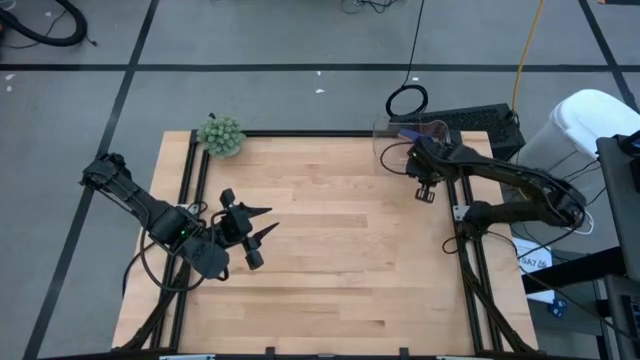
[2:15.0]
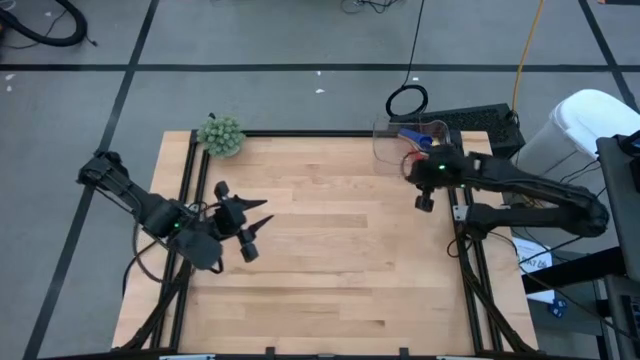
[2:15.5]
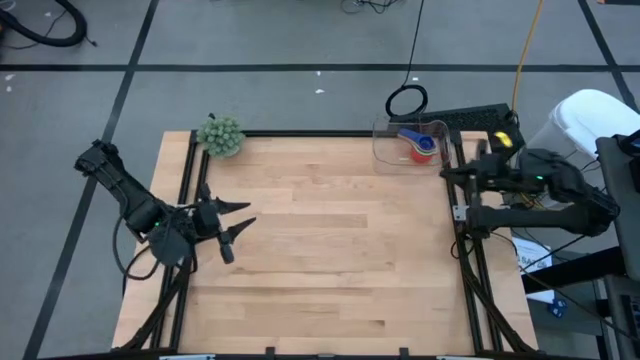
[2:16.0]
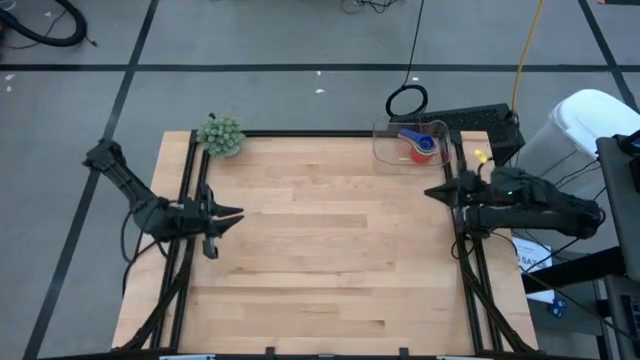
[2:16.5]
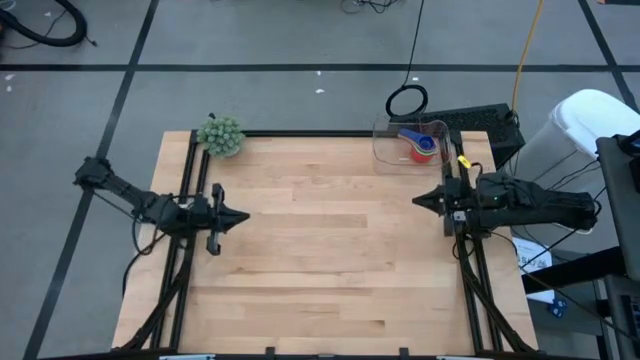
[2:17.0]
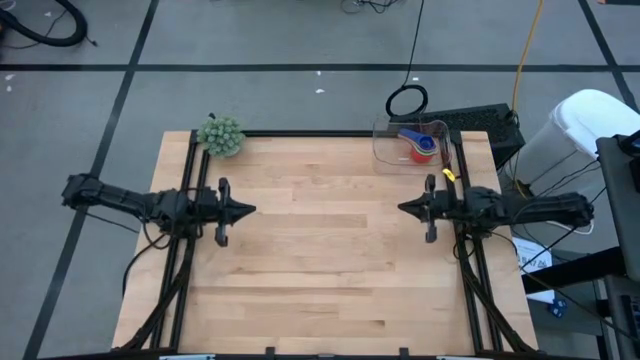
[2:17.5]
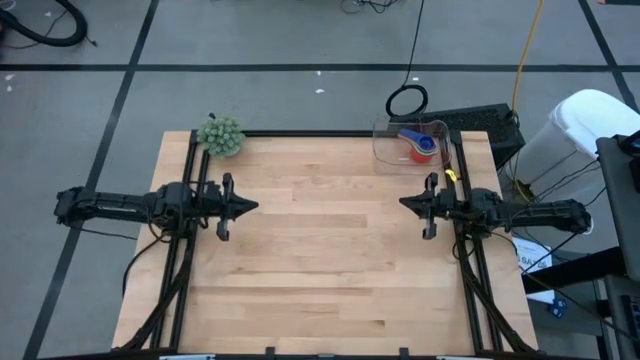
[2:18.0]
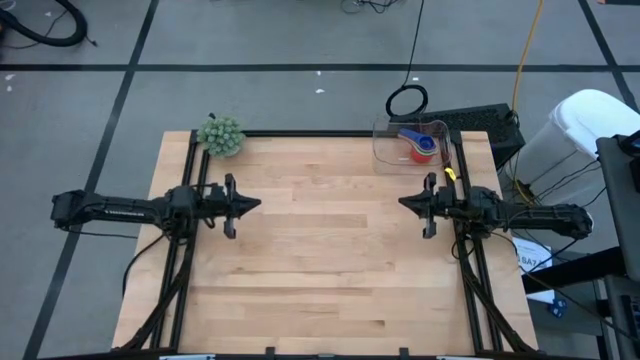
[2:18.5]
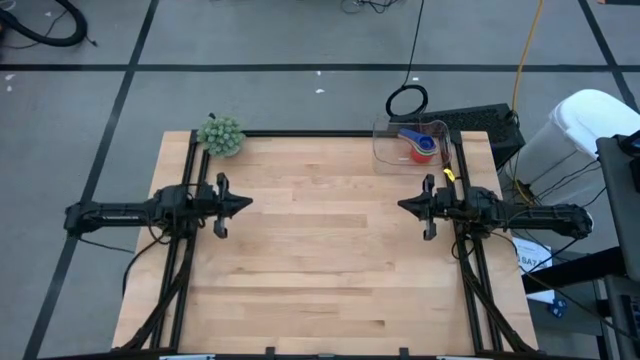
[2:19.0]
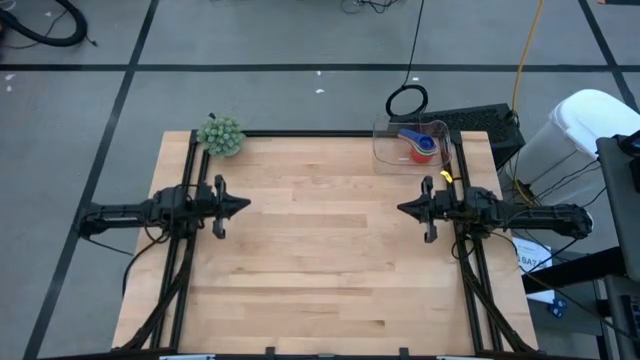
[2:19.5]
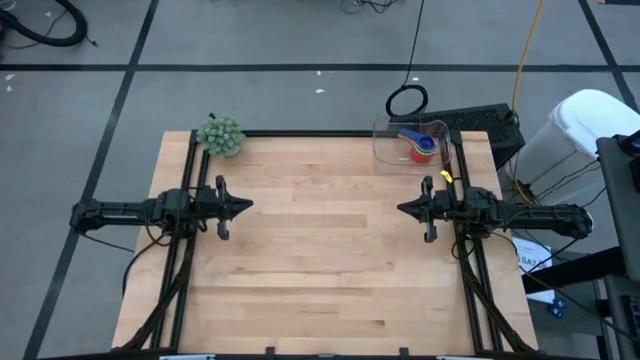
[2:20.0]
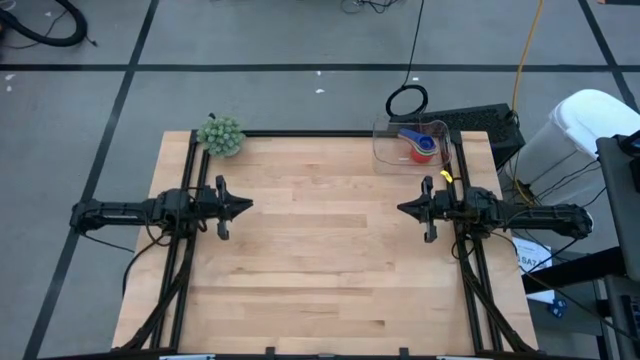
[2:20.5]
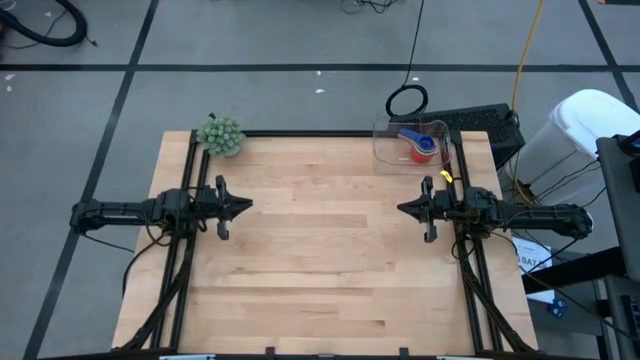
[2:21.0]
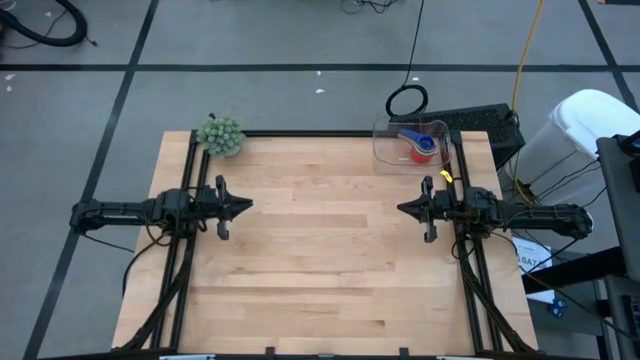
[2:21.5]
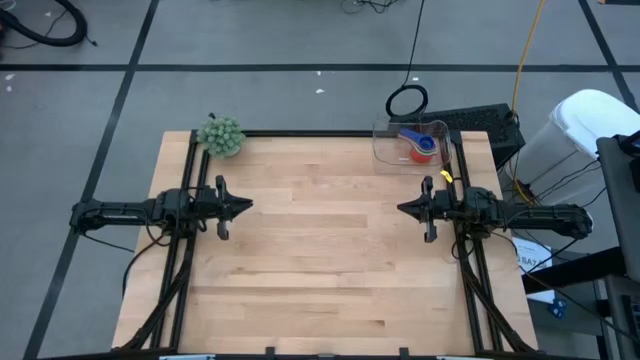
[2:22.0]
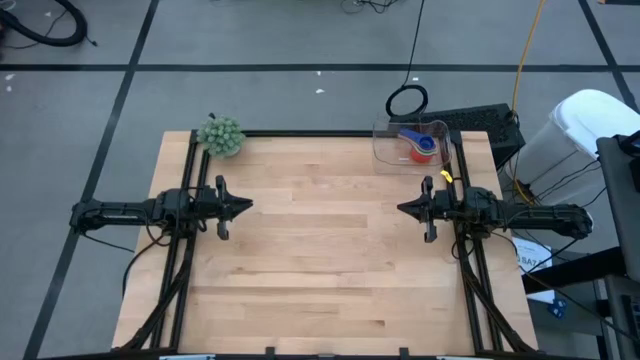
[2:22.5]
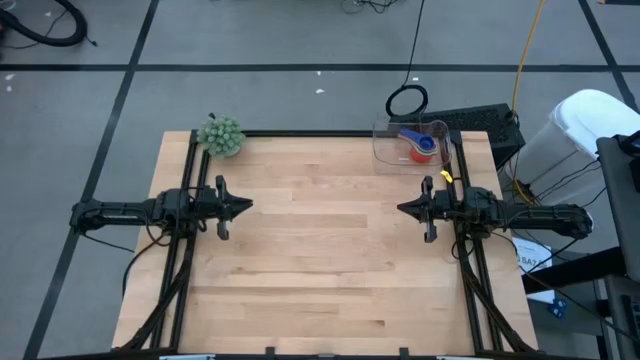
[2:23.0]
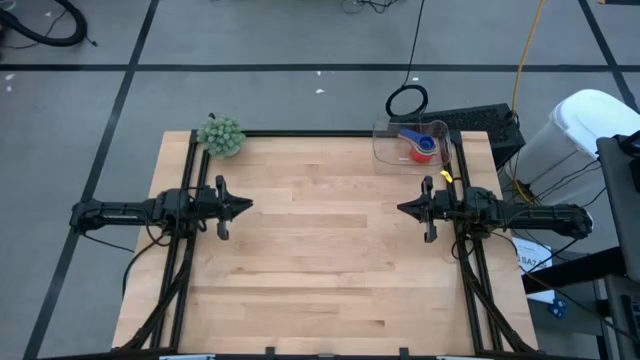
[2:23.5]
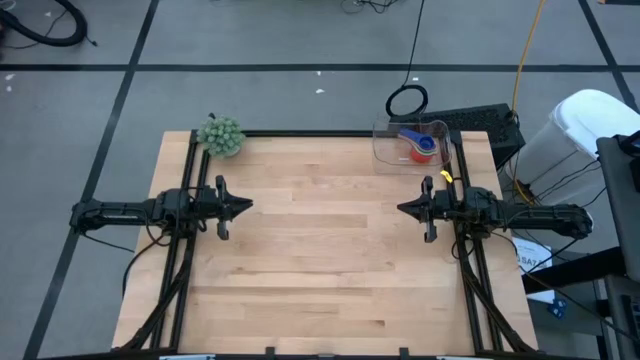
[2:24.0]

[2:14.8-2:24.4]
Task: Nest measuring cups in basket
Return to Home Position

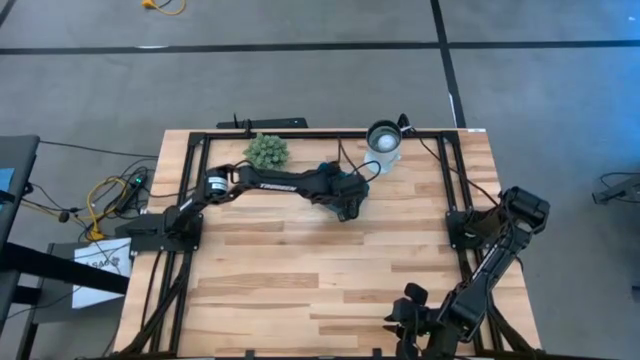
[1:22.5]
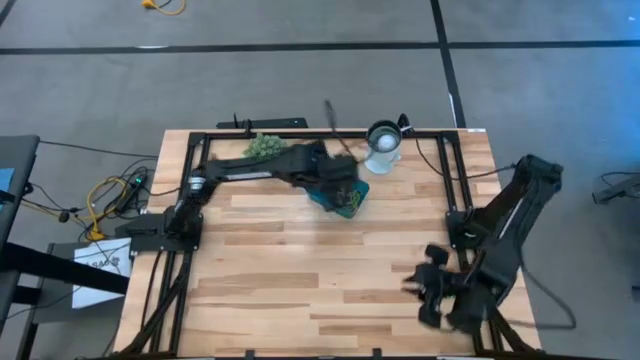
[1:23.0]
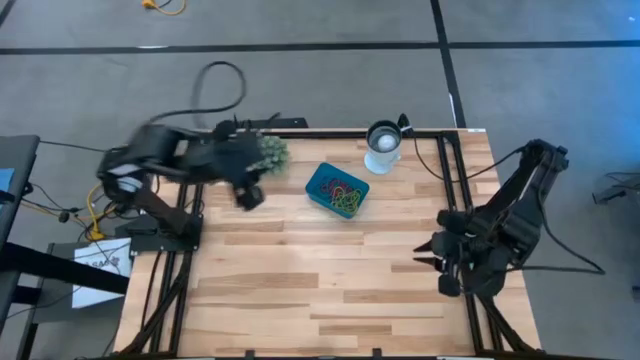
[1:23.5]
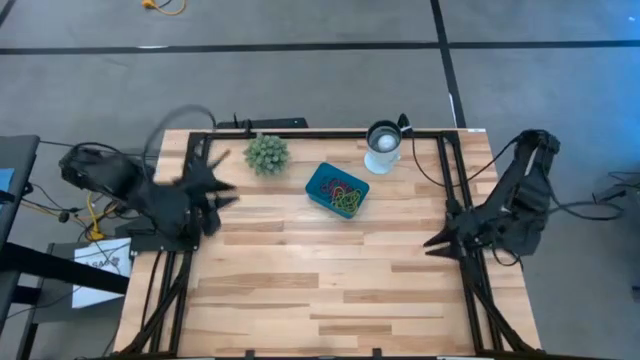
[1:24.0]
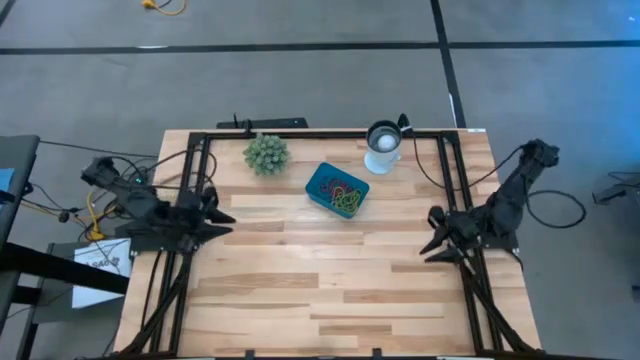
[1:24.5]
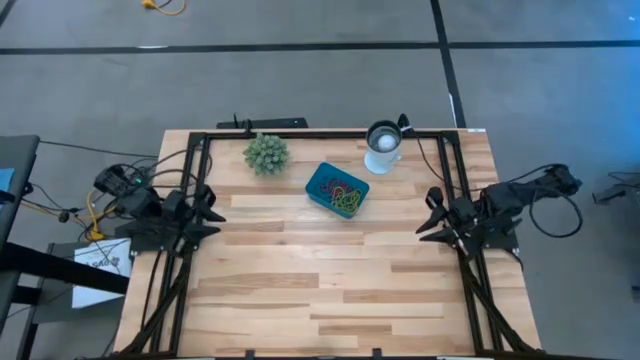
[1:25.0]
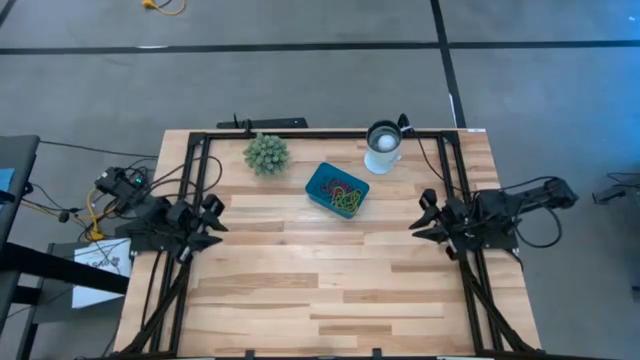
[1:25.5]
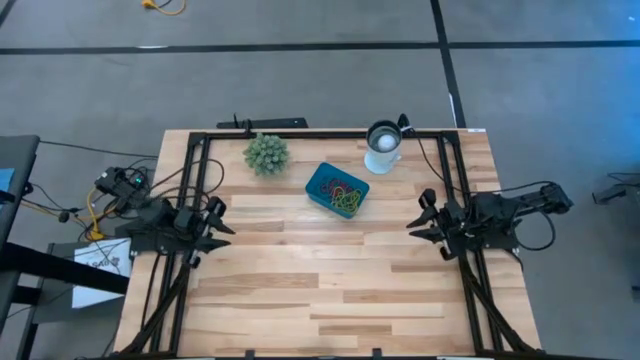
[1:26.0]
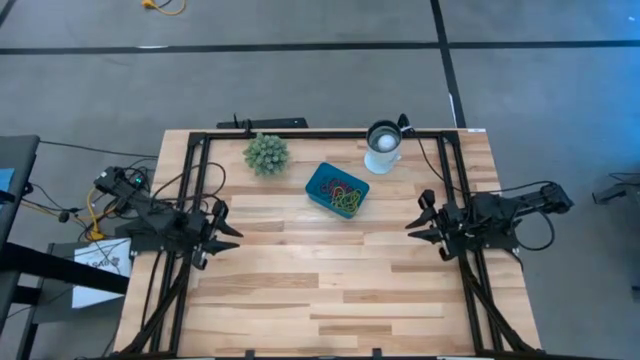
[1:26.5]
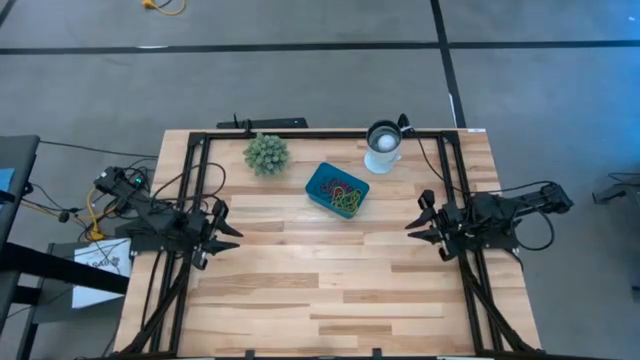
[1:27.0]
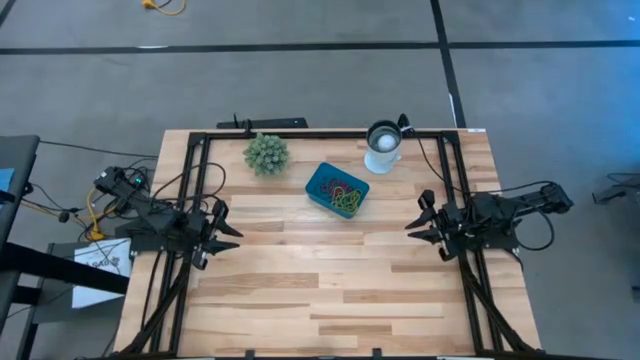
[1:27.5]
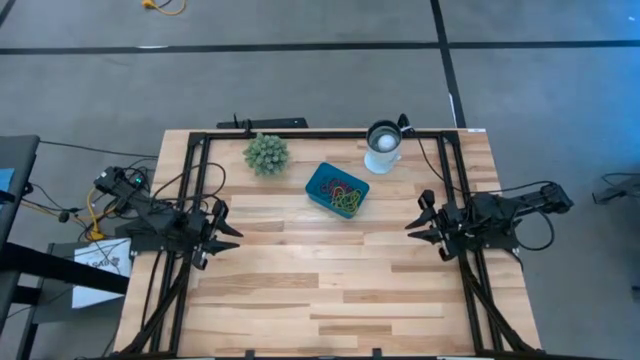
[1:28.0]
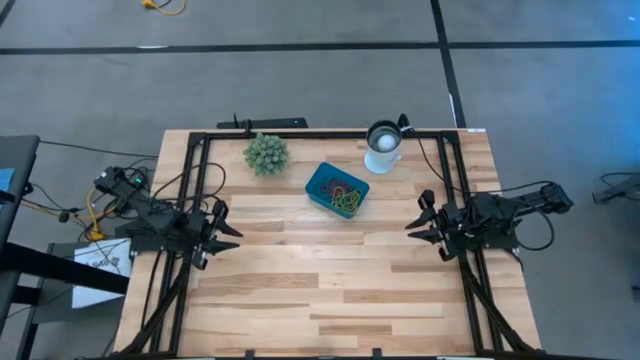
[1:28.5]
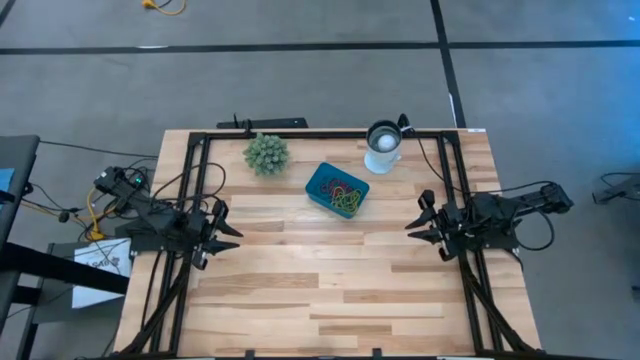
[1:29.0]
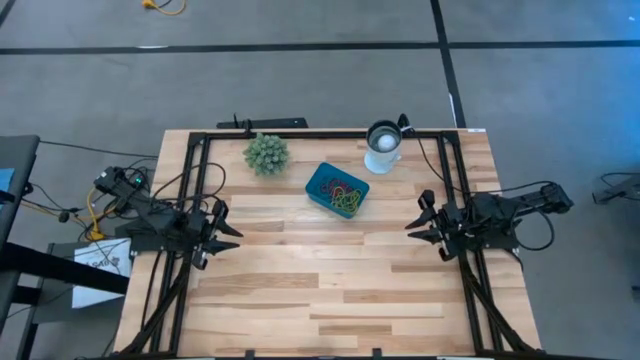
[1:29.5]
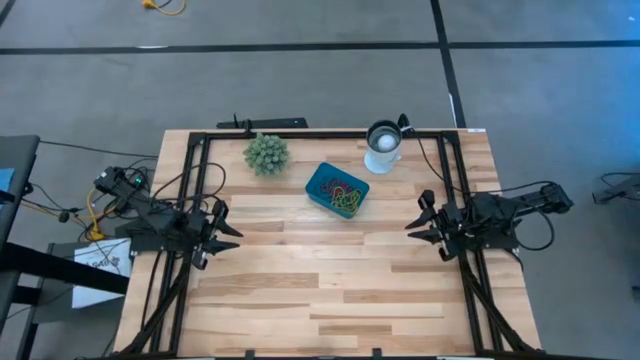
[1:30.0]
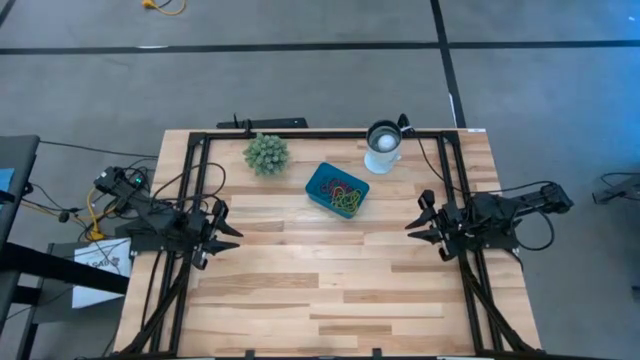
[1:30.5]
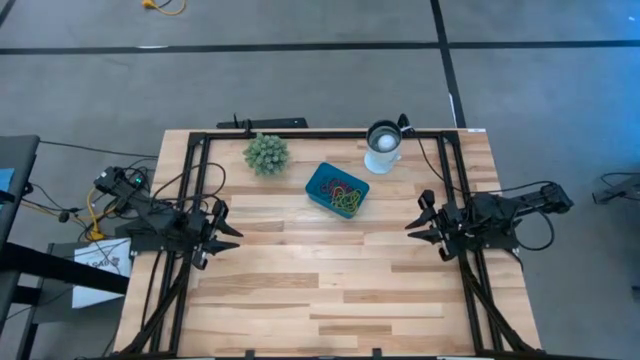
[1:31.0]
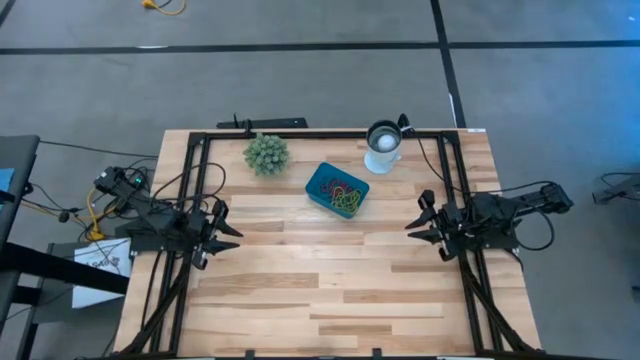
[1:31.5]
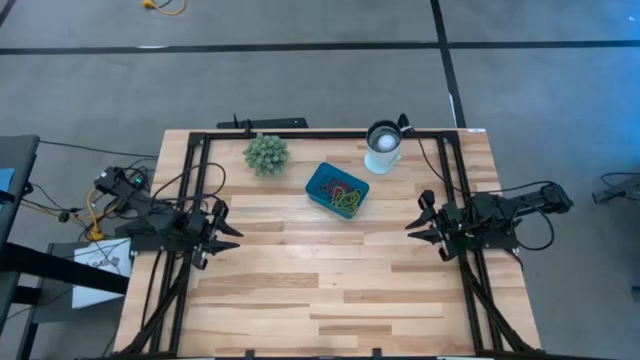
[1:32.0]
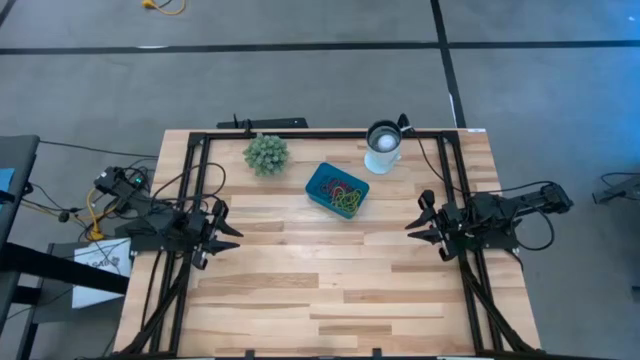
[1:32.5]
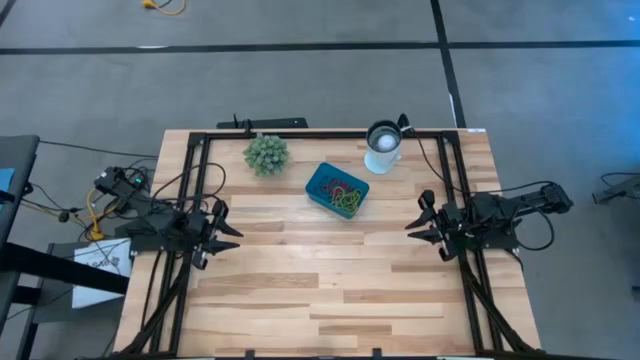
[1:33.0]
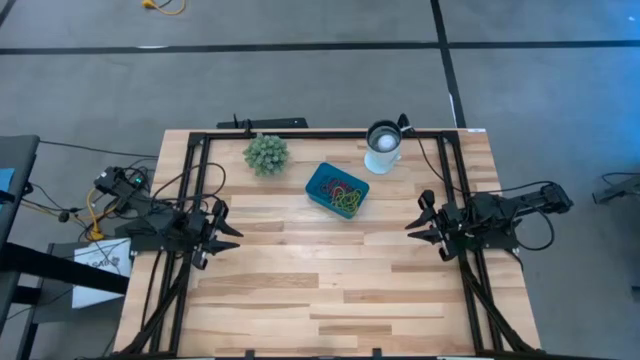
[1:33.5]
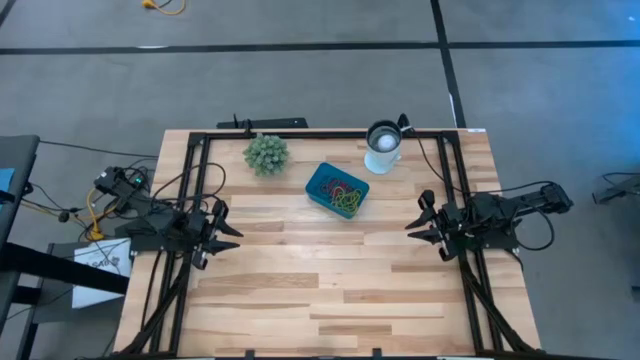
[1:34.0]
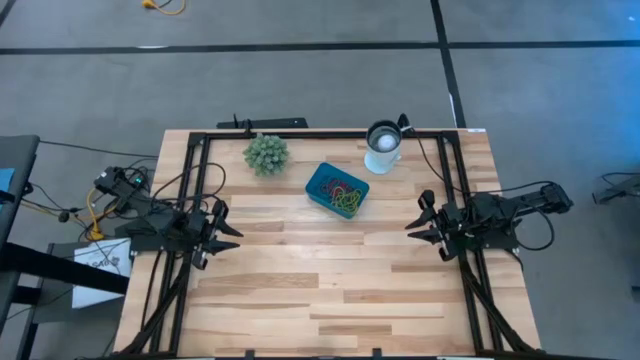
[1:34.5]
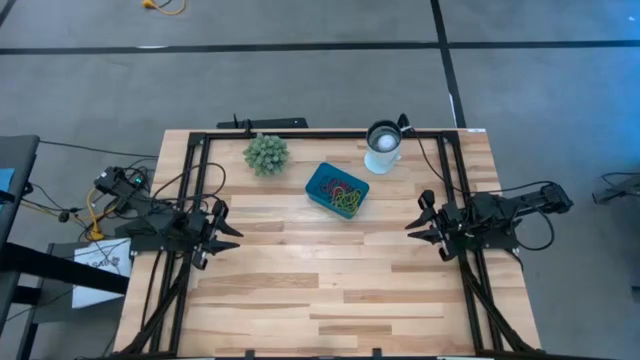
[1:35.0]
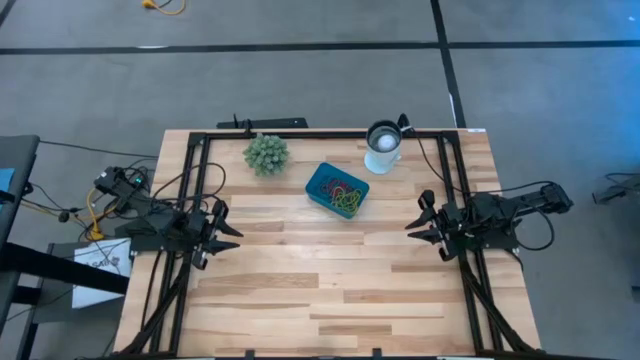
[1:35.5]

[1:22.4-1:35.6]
Task: Pick and place items into bin
Return to Home Position
